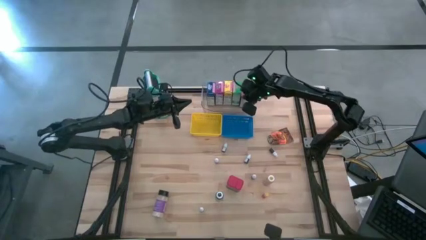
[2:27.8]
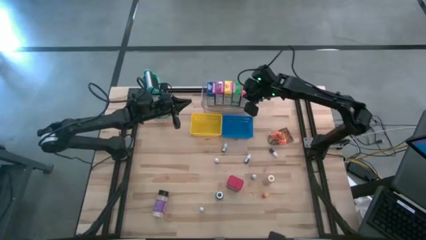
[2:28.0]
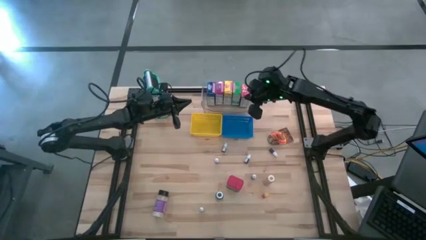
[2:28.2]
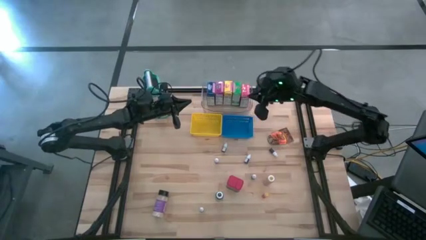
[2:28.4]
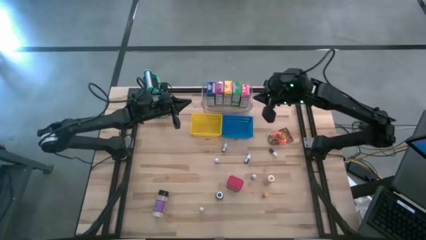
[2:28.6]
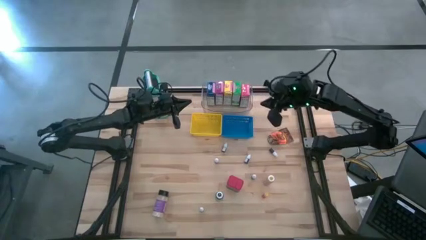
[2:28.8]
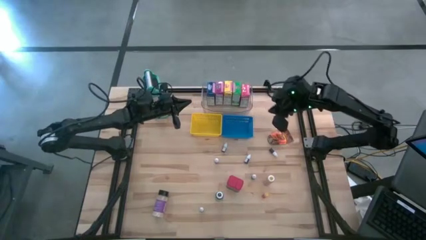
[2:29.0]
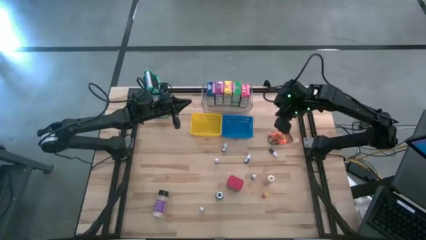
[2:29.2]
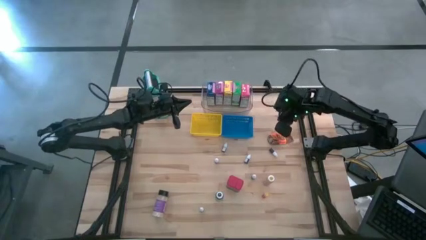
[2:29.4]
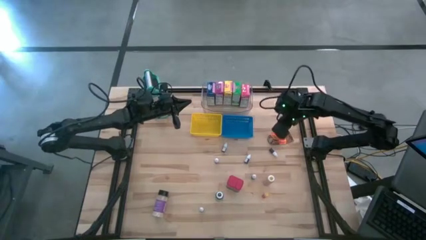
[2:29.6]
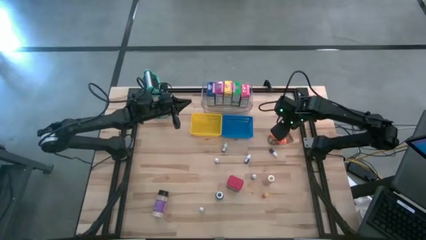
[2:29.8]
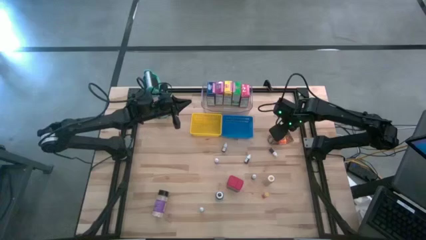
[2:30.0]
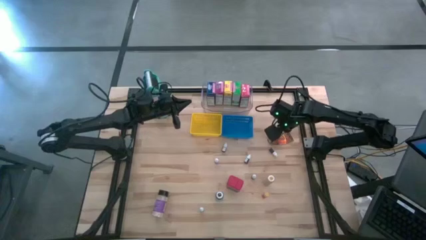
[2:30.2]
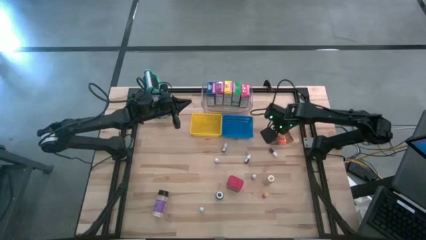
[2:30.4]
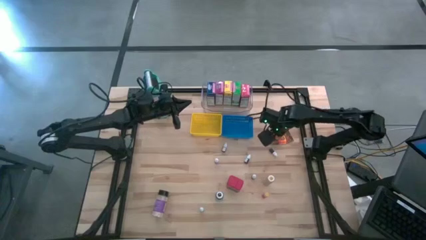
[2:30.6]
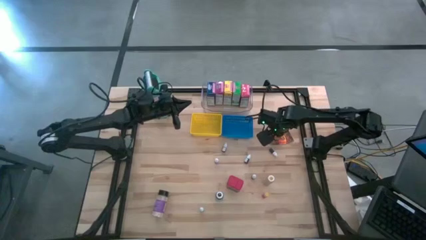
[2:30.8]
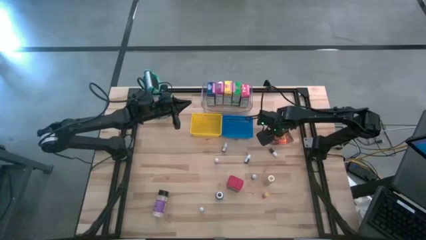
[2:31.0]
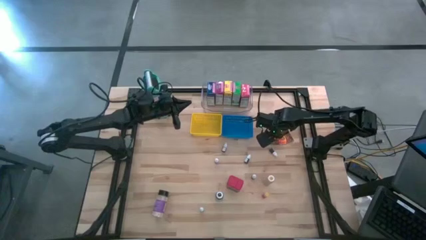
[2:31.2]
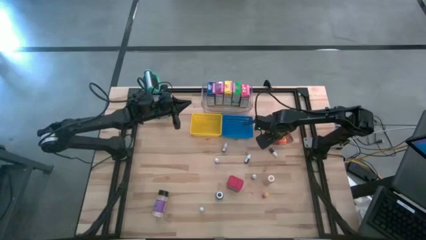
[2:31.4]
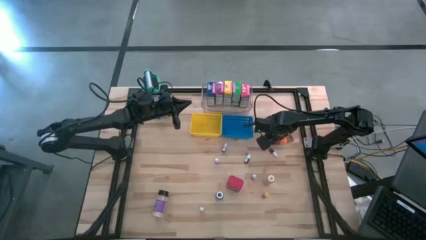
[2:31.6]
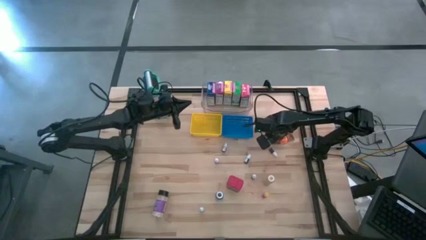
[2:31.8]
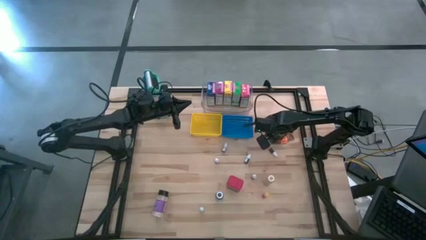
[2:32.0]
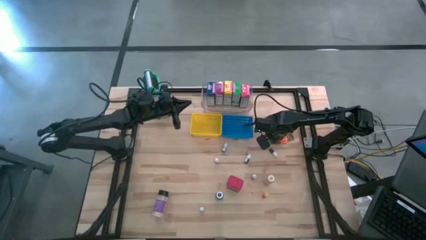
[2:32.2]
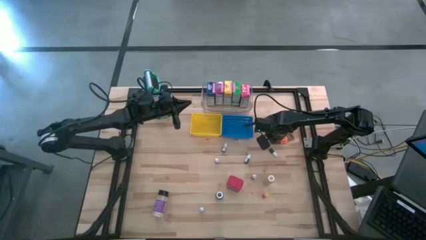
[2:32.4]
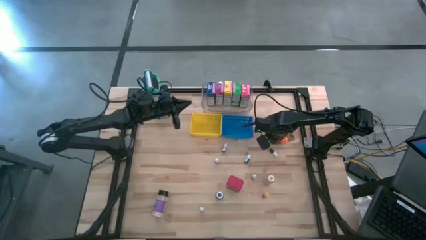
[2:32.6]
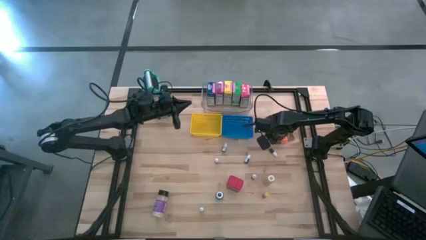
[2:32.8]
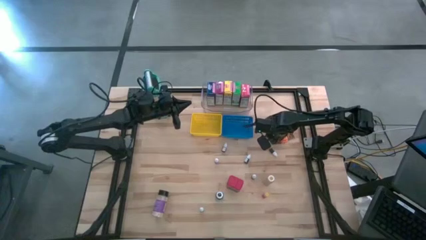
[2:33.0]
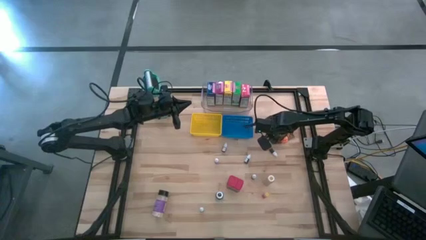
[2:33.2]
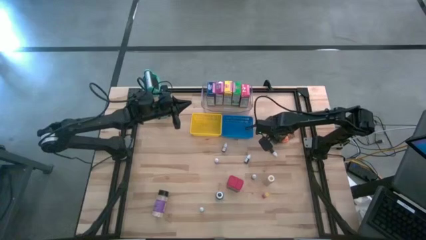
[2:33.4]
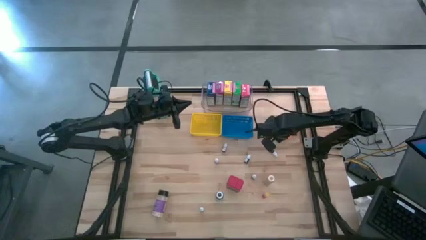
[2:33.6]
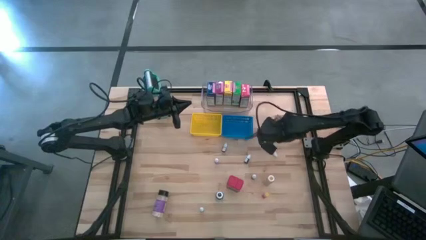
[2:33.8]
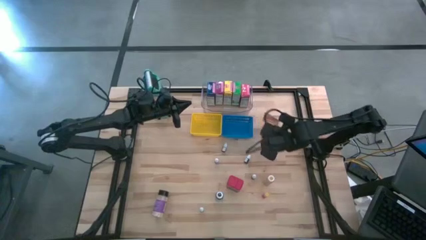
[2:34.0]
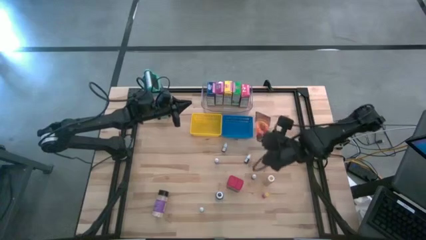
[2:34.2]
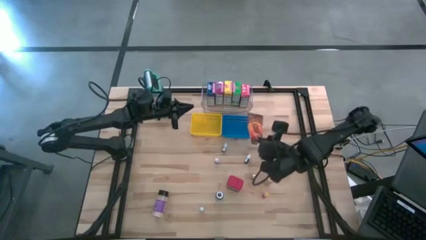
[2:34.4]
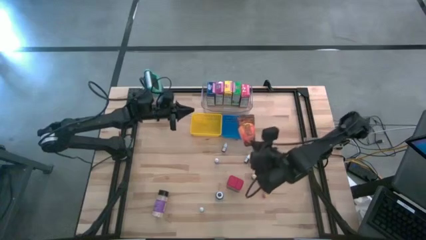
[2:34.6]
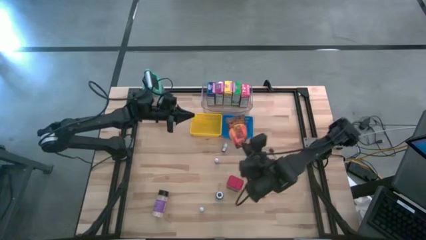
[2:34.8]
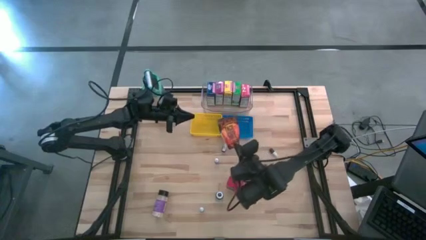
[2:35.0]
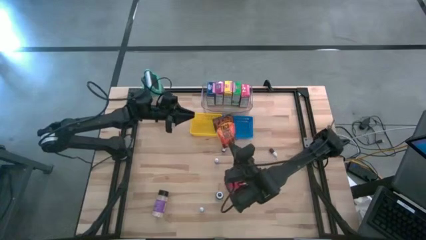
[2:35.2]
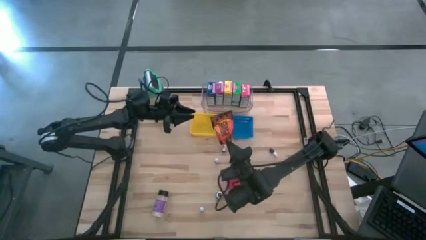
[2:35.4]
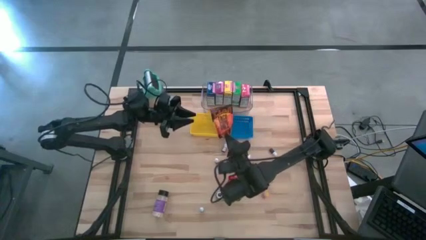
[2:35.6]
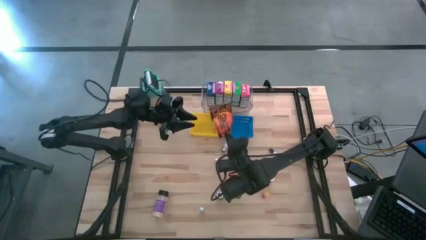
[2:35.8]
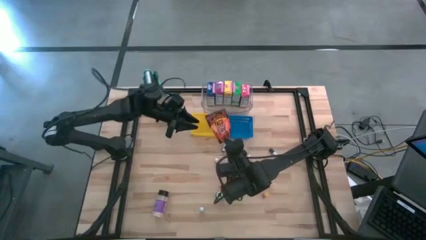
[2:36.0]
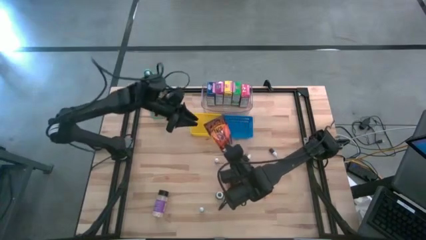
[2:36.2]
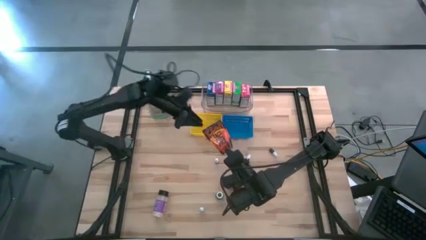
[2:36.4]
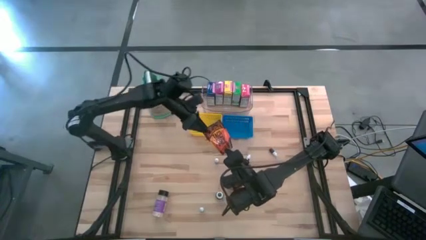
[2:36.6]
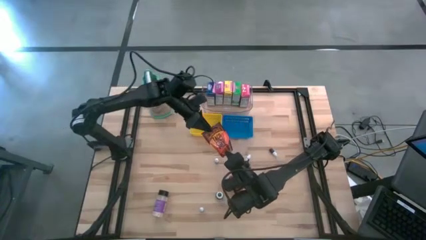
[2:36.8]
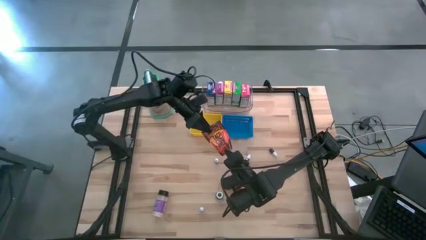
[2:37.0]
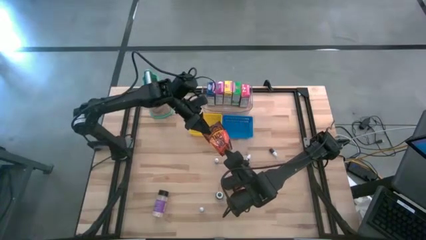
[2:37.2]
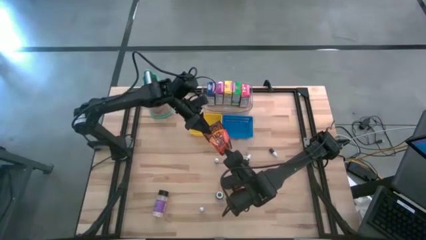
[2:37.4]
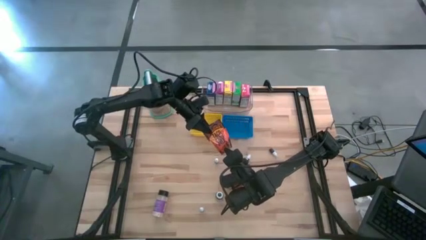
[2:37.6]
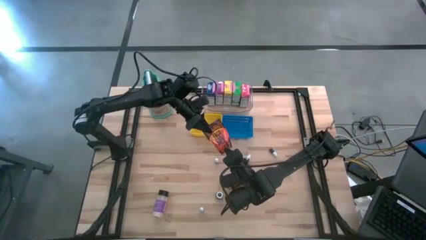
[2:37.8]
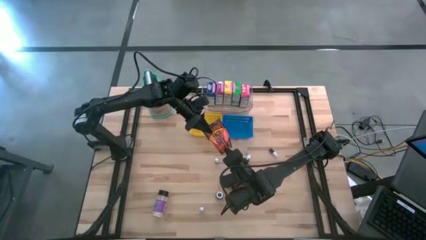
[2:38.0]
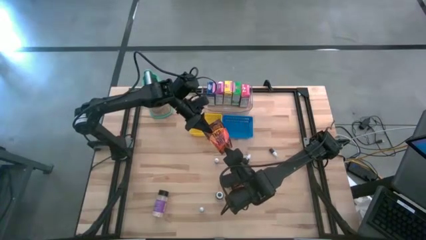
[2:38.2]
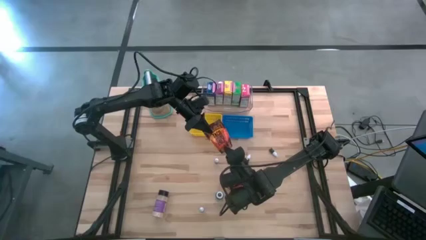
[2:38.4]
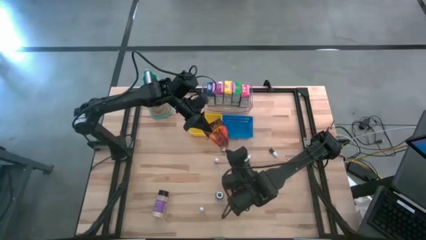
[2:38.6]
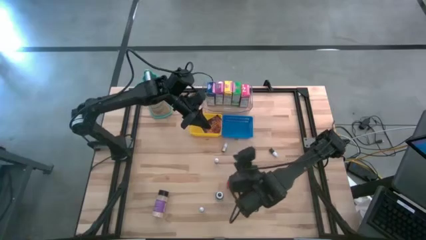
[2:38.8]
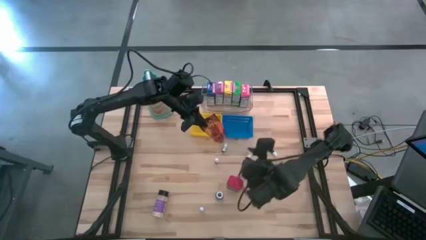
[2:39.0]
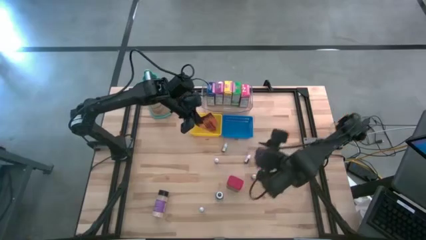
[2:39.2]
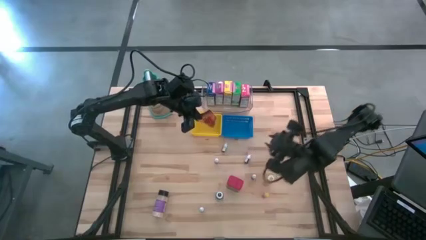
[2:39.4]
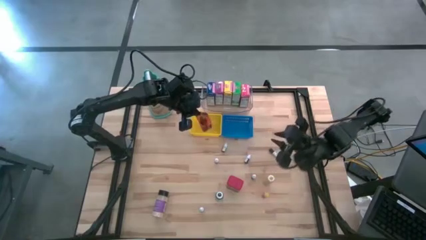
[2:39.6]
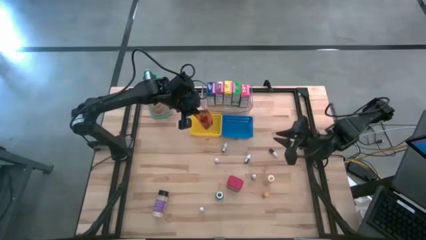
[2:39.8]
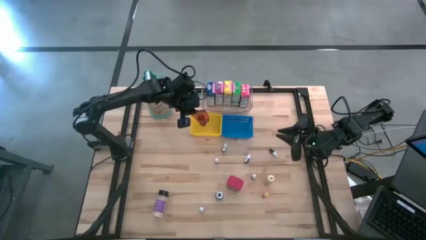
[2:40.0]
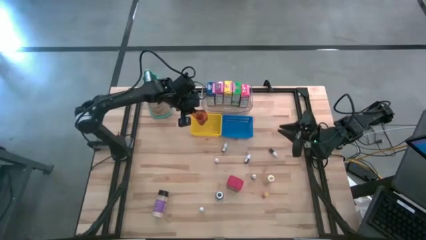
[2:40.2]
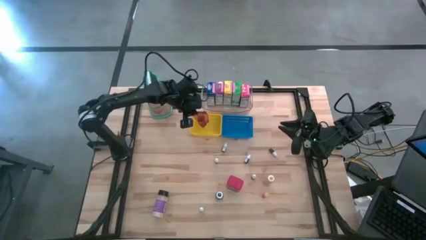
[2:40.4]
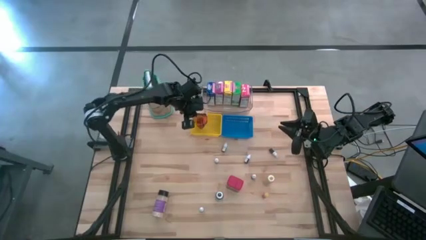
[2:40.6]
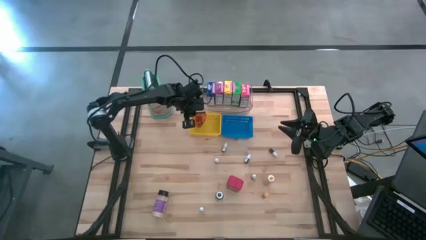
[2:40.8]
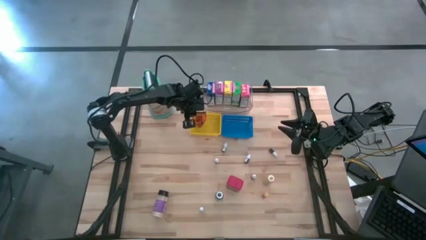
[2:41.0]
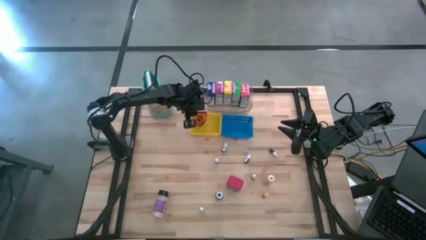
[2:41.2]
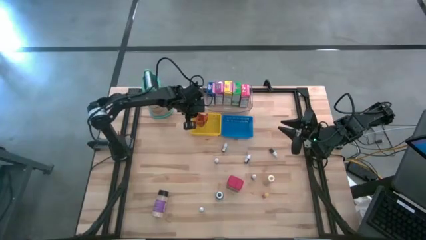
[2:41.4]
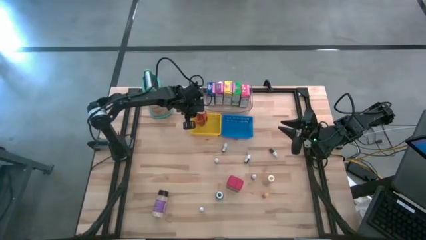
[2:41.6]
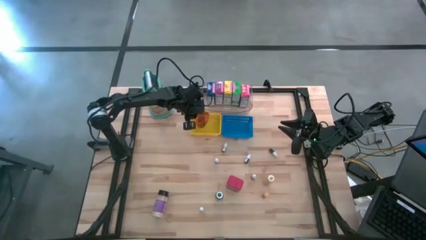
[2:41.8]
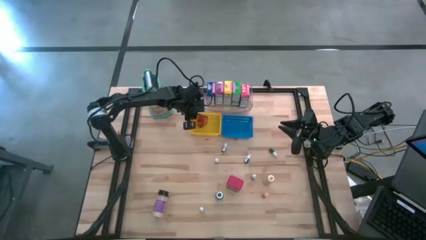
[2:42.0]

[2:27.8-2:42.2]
Task: Pick & Place Kitchen Items
Put the orange seasoning pack into the yellow bin
